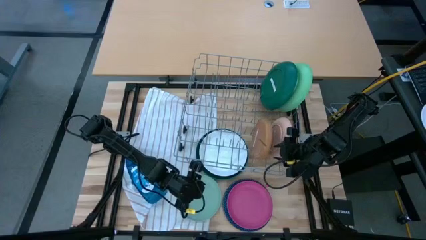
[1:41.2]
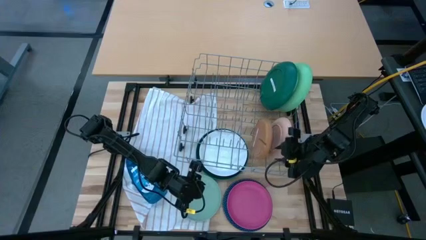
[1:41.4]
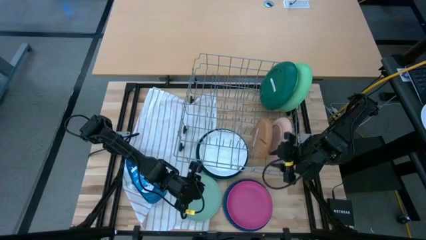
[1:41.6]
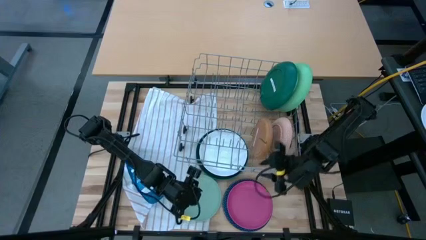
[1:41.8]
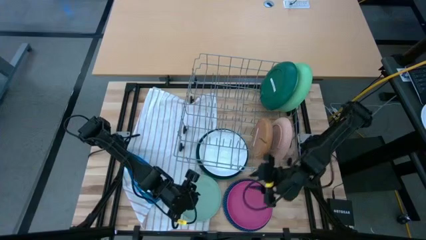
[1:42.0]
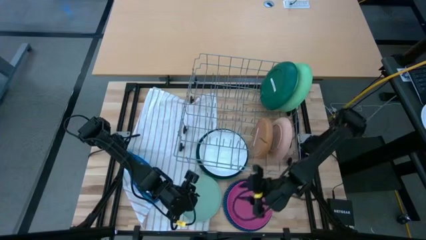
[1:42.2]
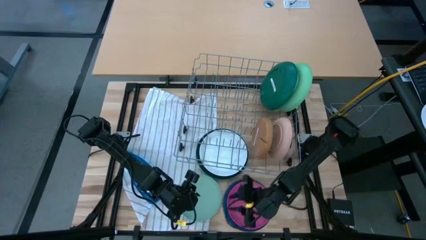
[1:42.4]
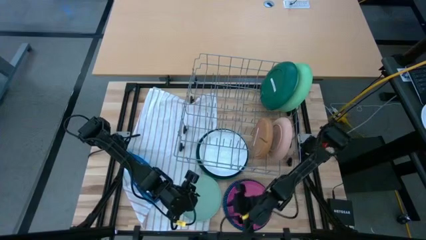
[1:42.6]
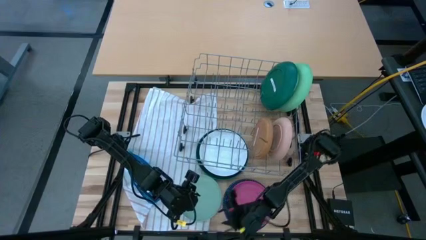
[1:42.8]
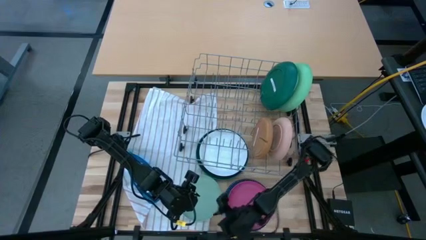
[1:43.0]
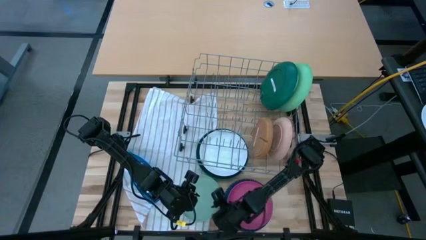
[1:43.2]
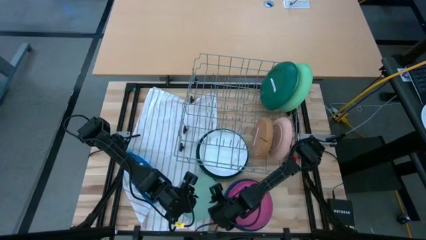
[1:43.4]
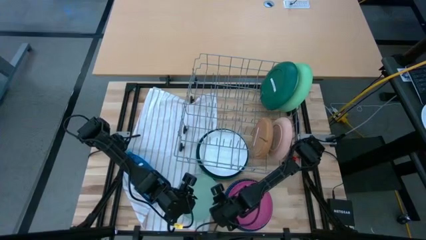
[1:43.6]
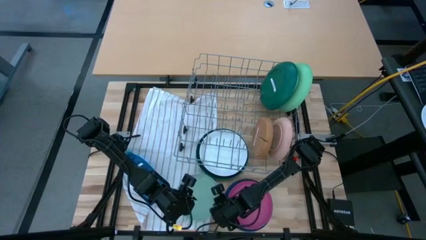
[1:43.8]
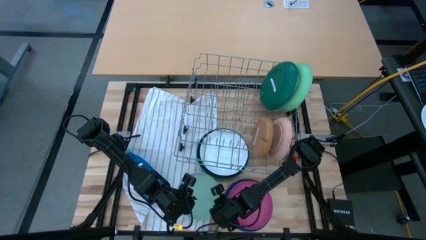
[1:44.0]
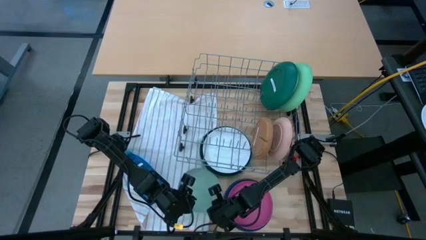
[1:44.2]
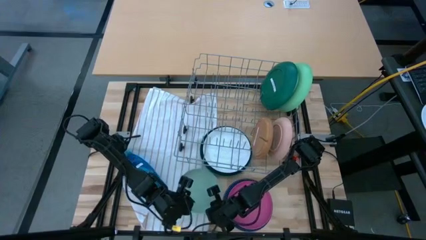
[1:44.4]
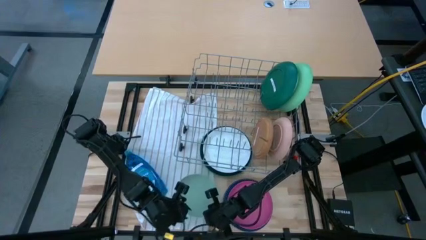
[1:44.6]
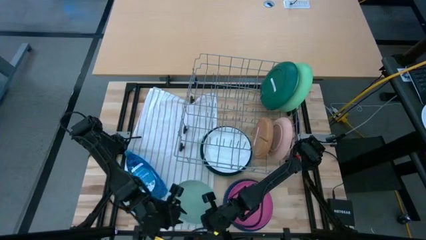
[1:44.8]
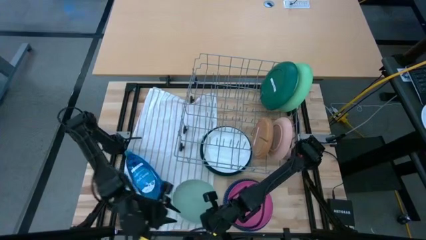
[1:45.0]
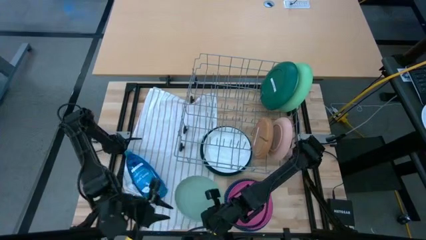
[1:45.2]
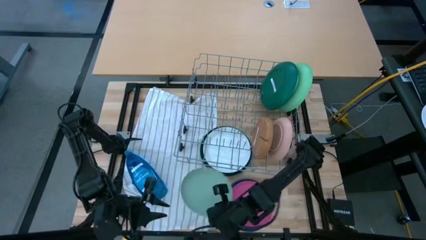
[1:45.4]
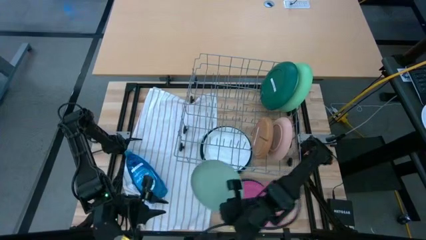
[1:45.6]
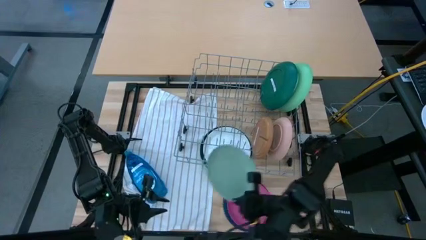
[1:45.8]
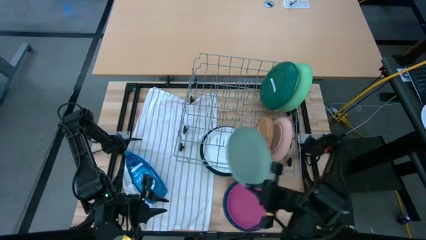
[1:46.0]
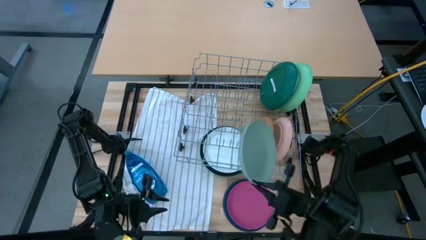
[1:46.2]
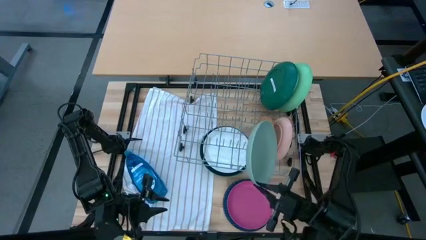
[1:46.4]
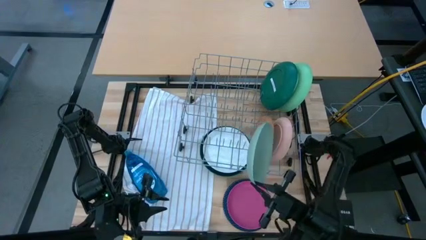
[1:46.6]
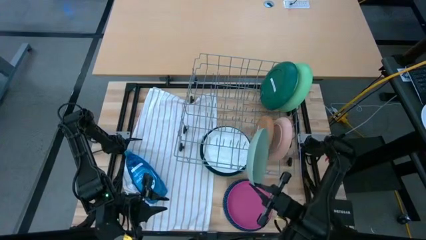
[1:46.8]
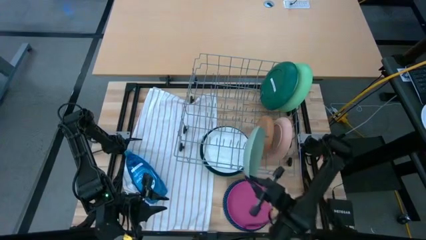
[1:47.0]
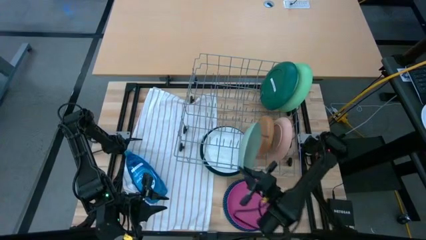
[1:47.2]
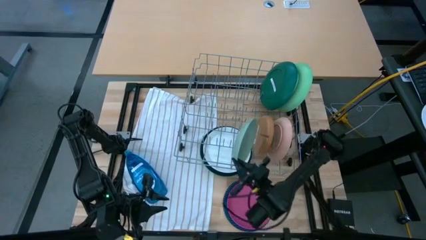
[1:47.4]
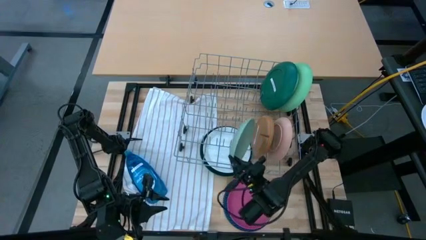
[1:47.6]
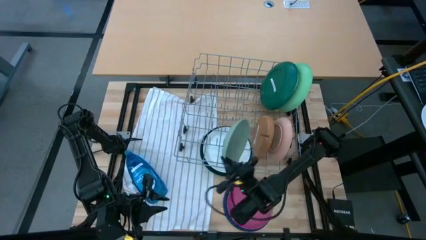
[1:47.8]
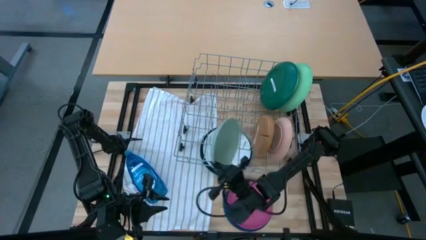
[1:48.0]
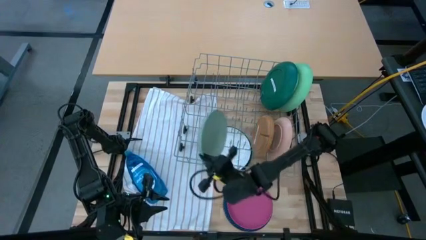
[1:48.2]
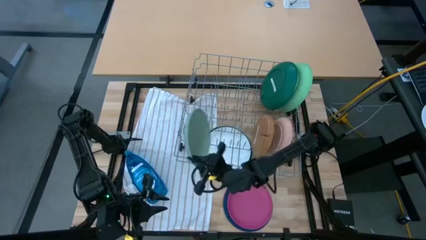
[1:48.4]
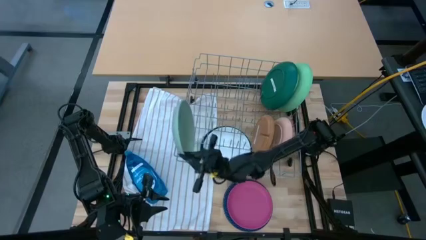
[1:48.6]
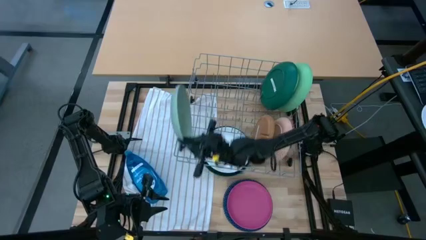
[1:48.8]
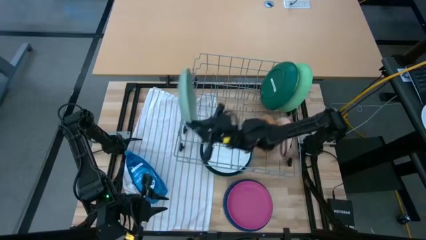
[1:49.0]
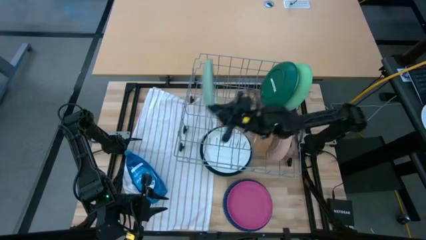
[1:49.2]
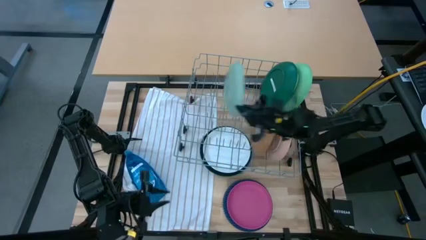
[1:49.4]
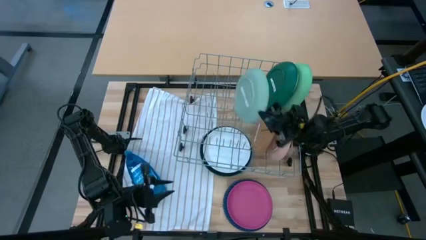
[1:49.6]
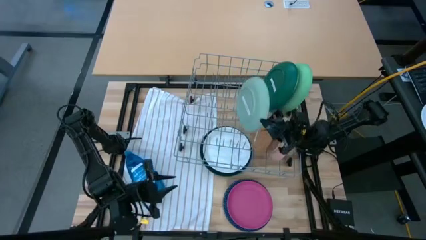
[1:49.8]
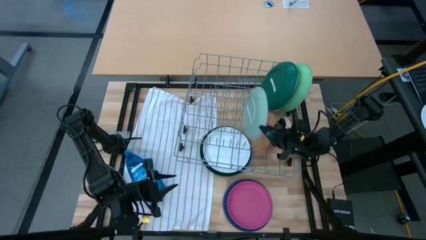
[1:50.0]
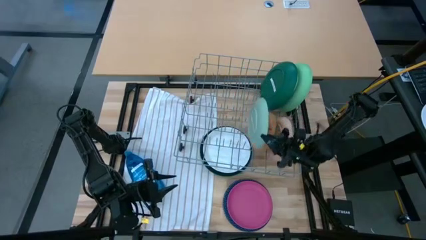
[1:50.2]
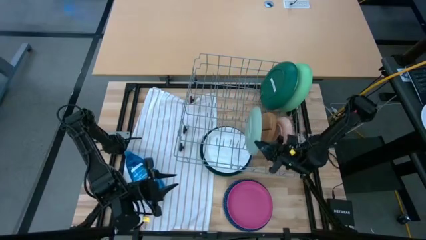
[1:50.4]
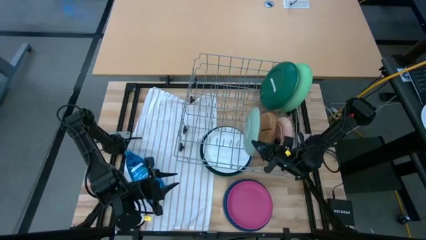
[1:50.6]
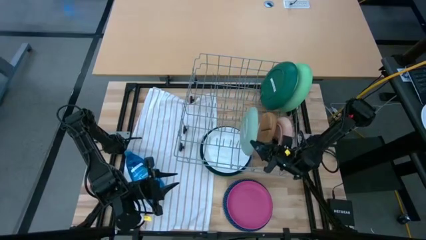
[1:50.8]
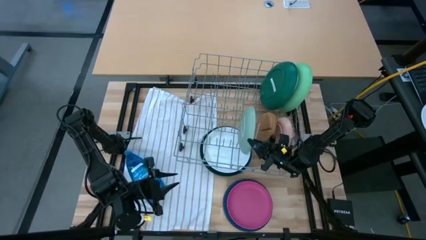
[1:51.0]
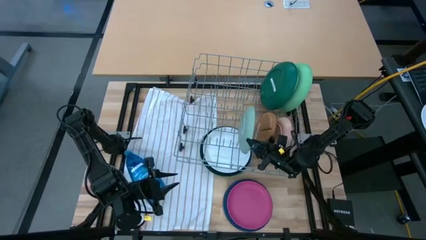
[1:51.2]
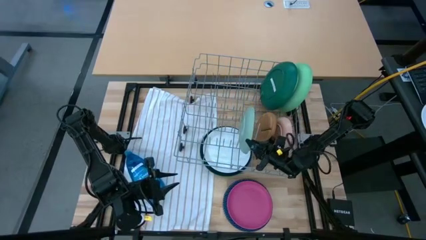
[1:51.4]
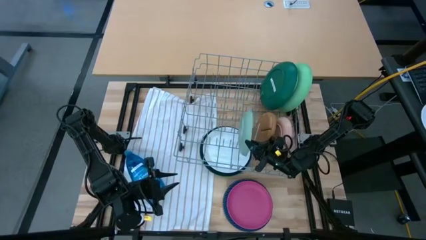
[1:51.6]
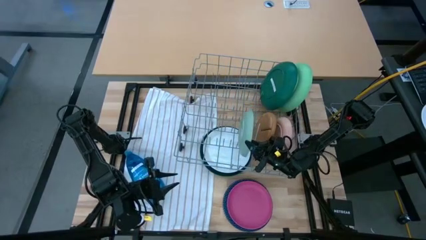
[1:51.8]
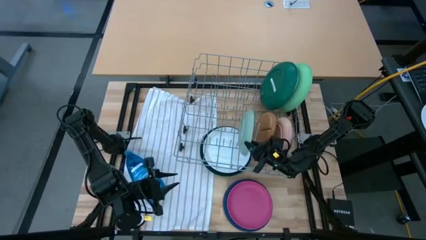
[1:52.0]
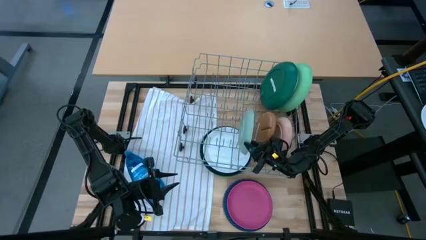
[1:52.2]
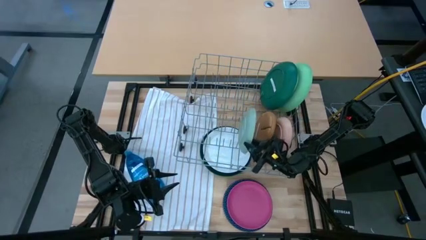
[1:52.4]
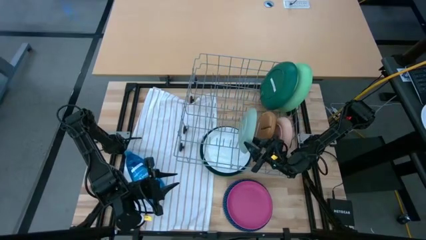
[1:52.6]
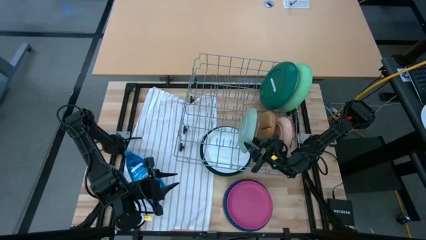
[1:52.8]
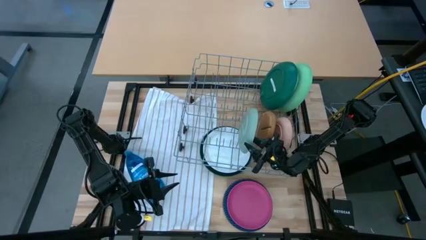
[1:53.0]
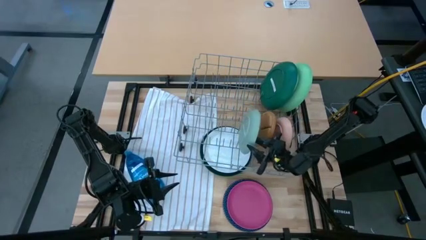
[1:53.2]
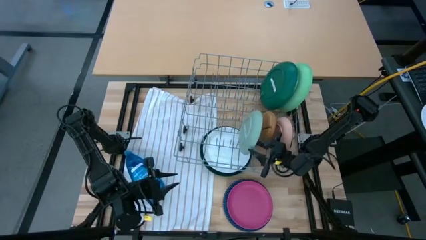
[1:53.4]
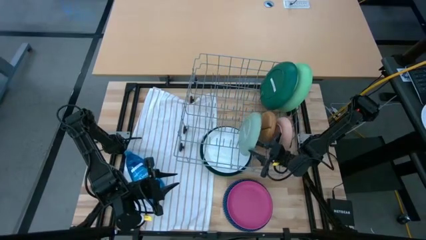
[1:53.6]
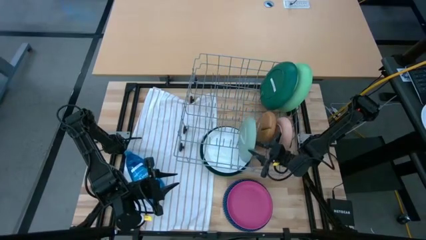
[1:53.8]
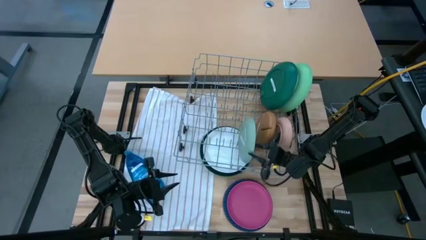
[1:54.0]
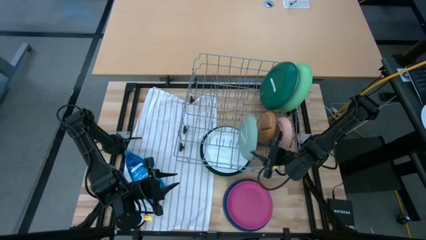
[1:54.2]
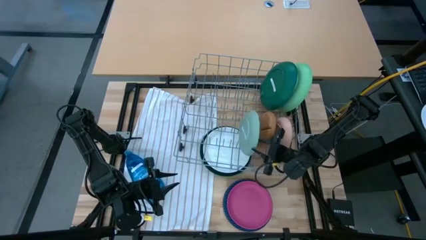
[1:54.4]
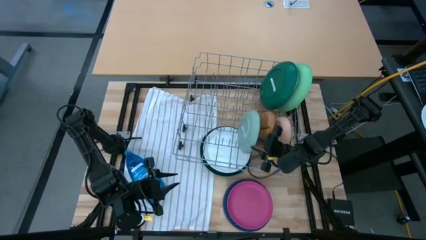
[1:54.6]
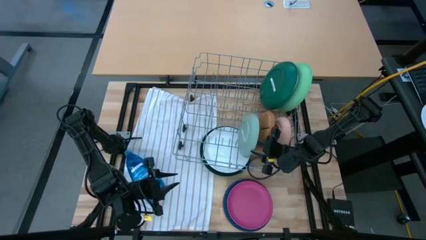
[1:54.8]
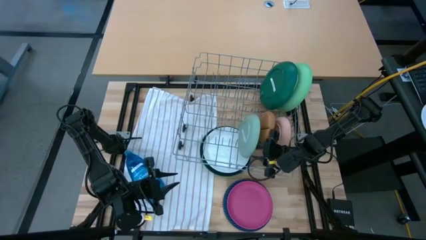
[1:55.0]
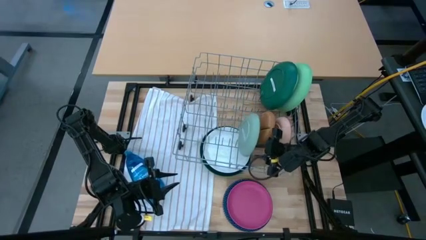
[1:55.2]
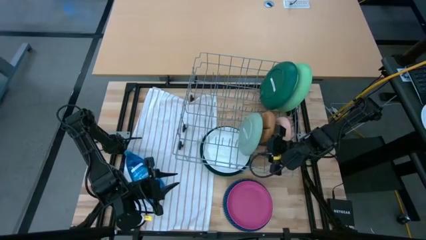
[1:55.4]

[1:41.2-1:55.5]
Task: Sort dishes
Put the light green plate in the dish rack

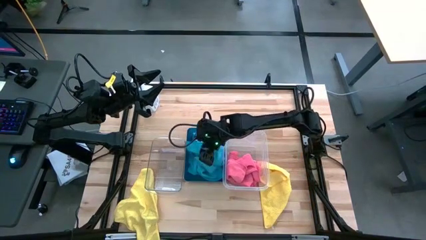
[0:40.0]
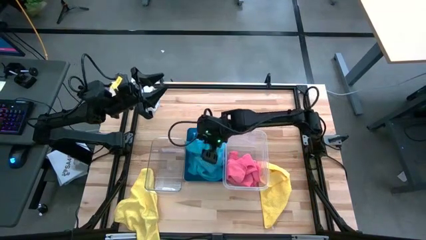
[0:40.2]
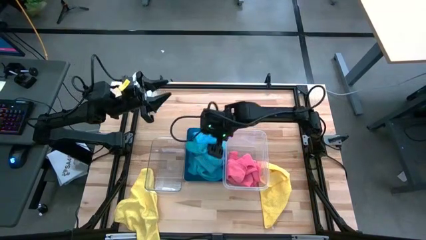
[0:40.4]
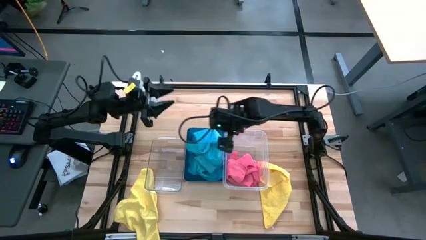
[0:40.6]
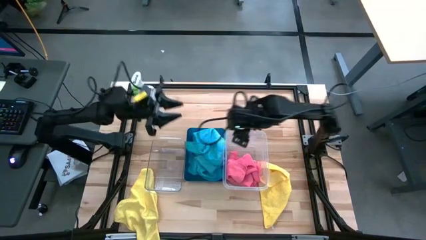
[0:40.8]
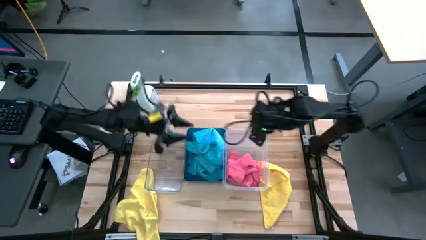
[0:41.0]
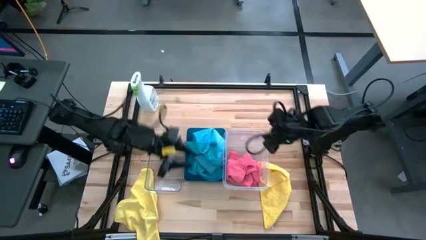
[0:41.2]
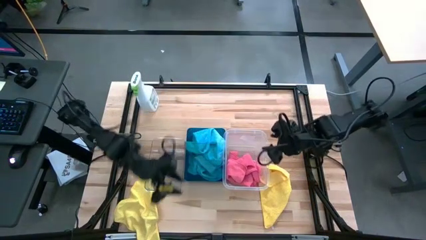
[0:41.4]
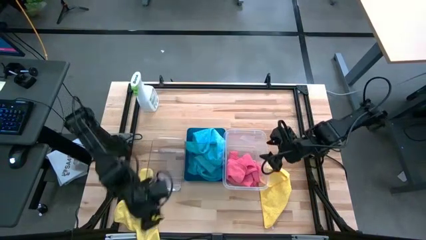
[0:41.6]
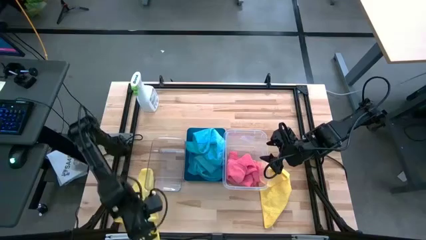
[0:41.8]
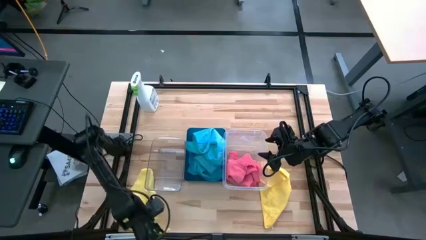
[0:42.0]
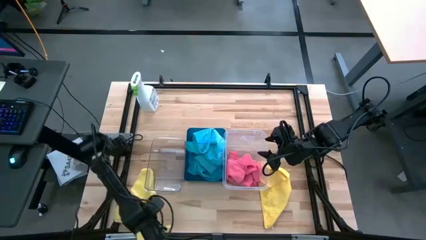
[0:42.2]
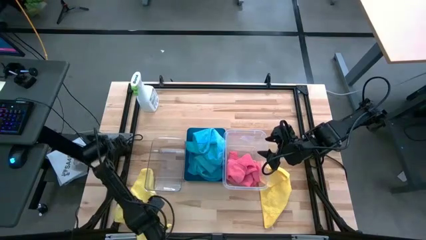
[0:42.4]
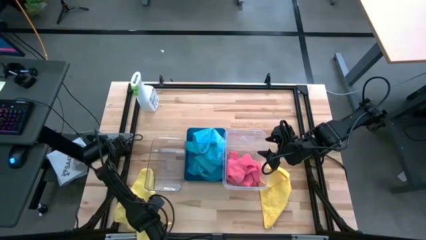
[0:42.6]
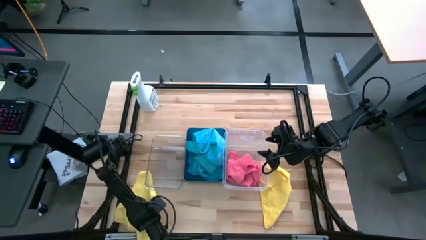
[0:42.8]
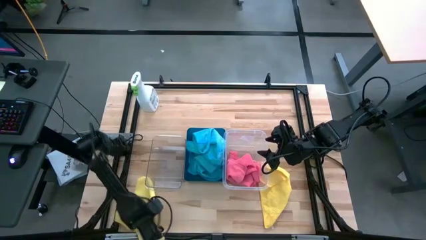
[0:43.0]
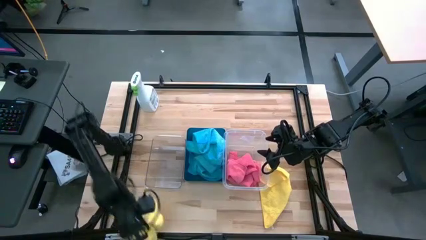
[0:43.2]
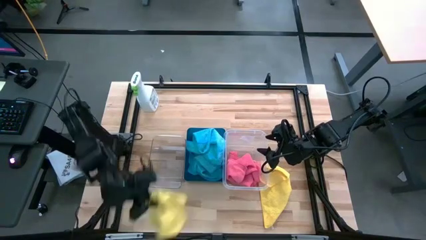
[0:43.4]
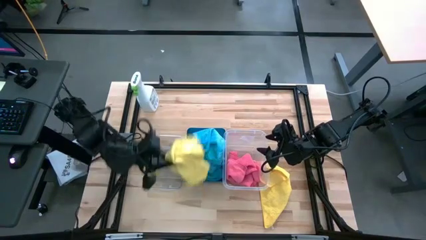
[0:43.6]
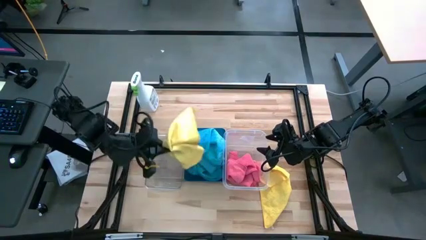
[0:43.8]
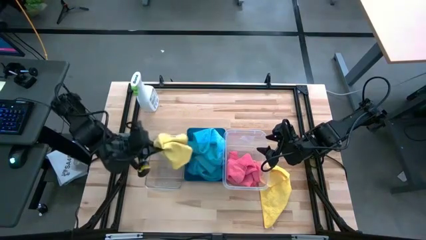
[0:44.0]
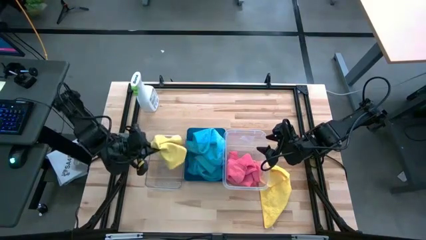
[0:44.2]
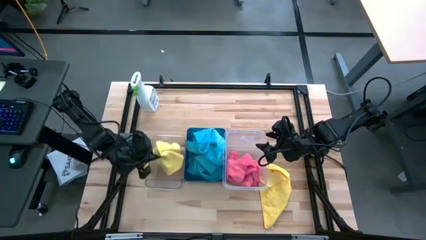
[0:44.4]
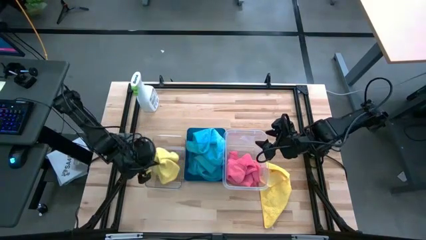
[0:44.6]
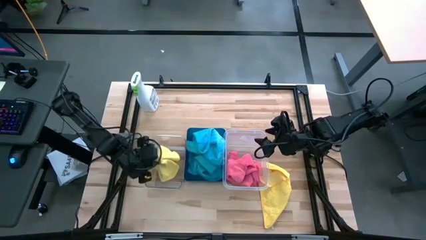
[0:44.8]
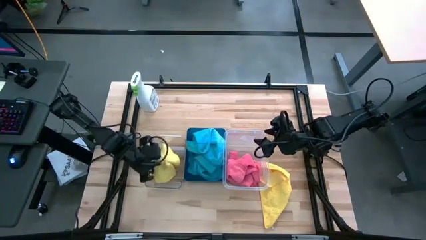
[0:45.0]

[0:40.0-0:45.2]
Task: Sort microfiber towel by color & place in baskets
Put the left yellow microfiber cloth into the left transparent bin
